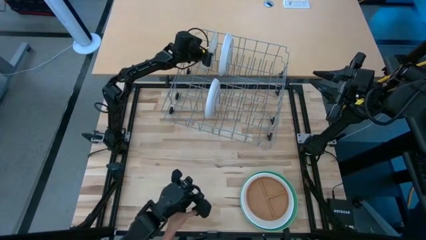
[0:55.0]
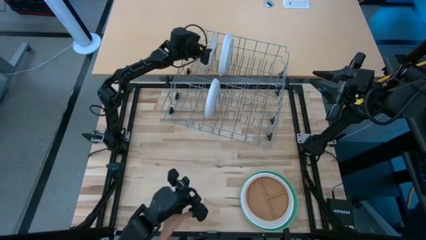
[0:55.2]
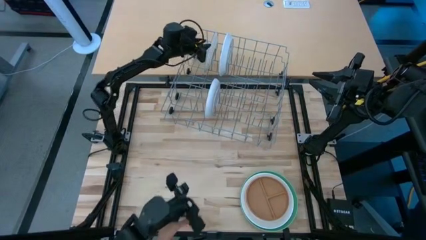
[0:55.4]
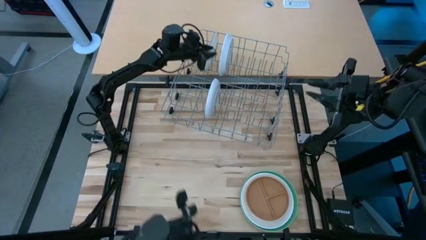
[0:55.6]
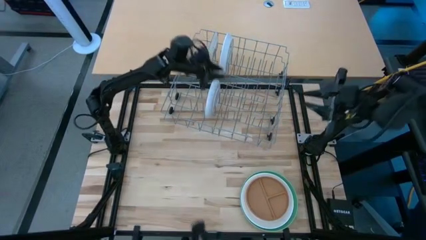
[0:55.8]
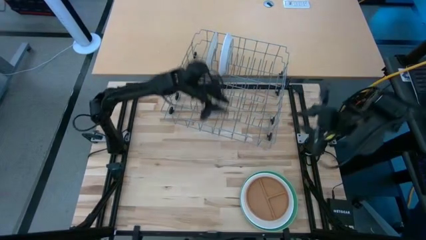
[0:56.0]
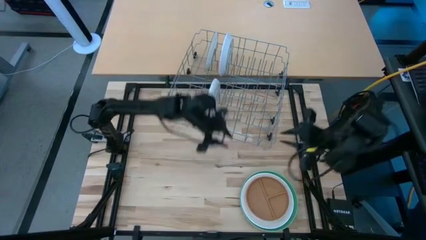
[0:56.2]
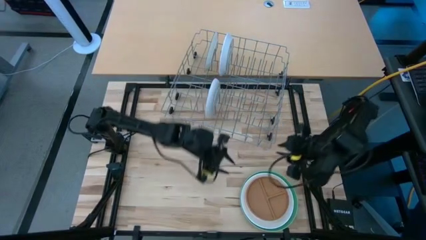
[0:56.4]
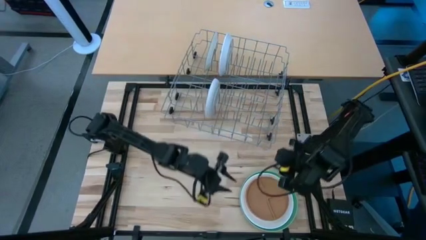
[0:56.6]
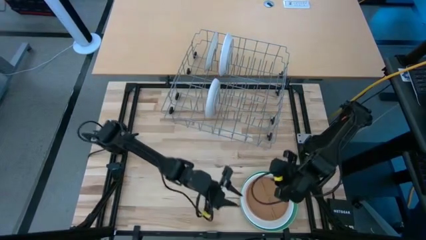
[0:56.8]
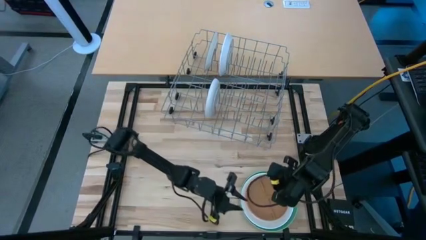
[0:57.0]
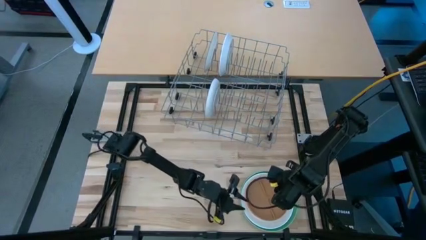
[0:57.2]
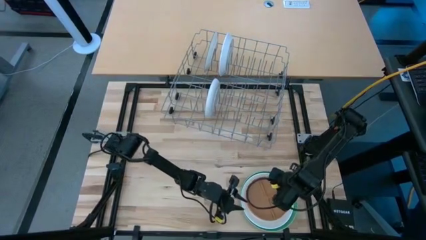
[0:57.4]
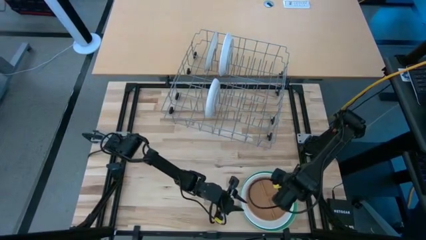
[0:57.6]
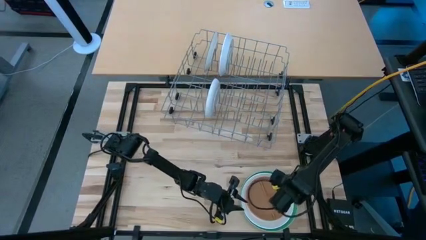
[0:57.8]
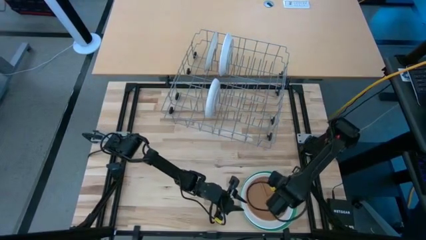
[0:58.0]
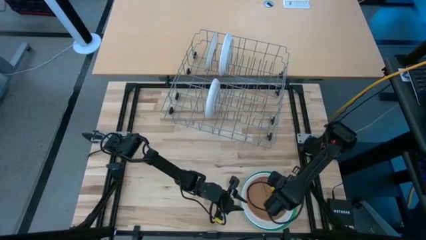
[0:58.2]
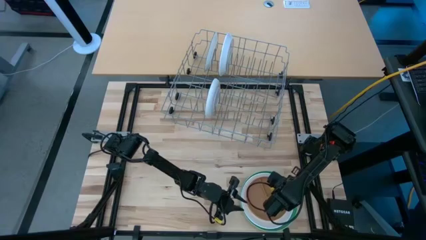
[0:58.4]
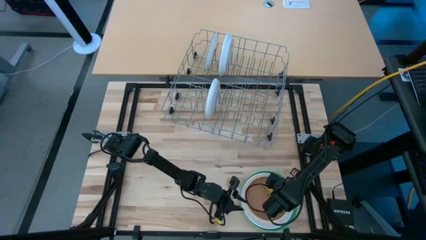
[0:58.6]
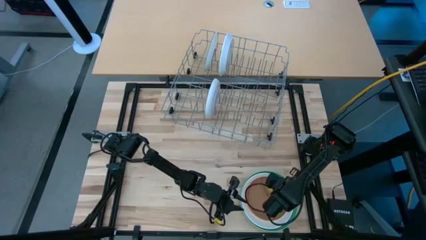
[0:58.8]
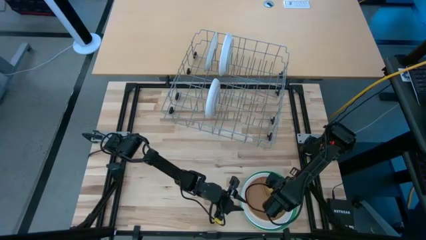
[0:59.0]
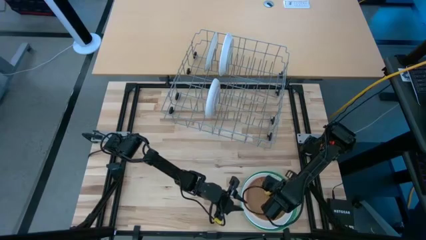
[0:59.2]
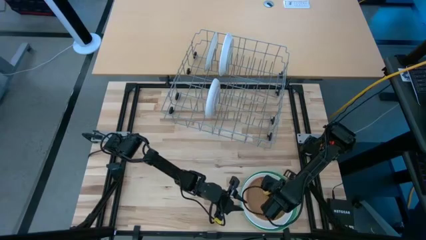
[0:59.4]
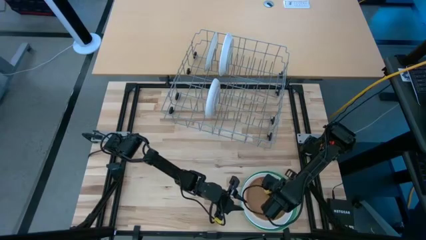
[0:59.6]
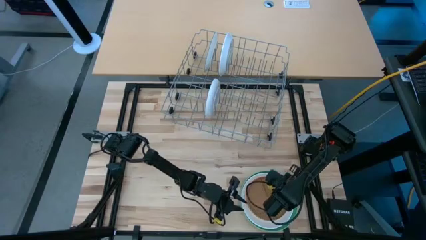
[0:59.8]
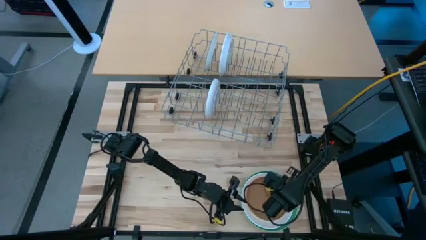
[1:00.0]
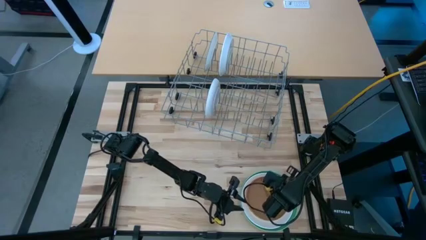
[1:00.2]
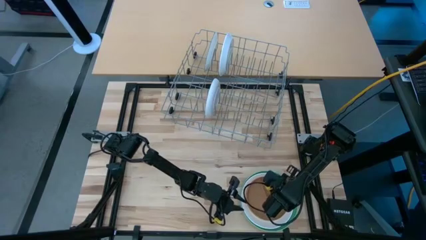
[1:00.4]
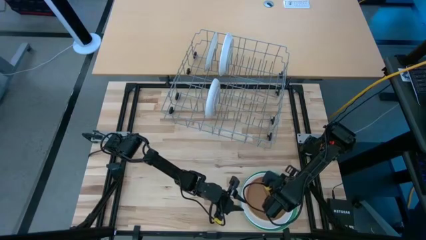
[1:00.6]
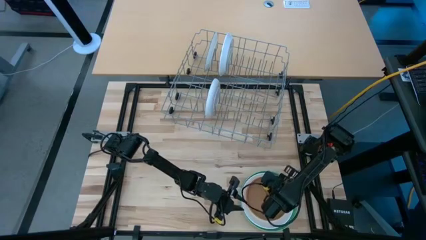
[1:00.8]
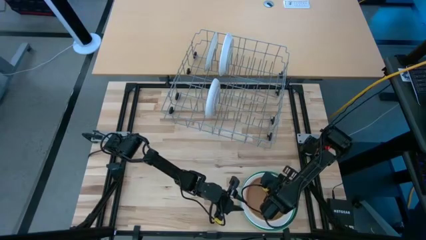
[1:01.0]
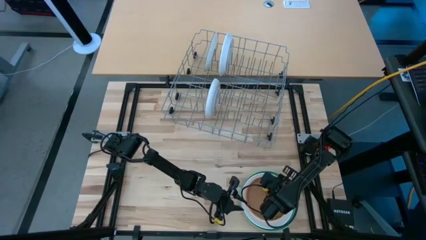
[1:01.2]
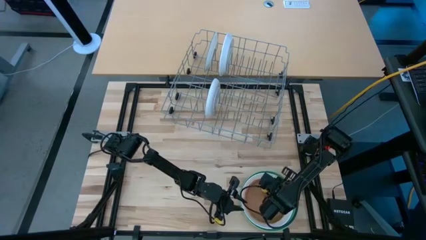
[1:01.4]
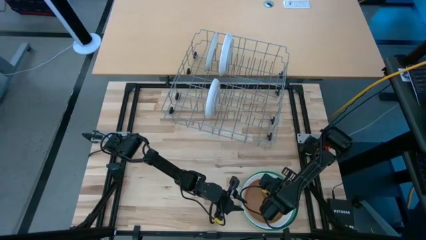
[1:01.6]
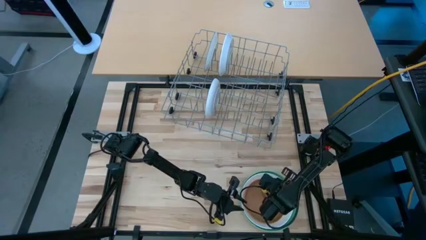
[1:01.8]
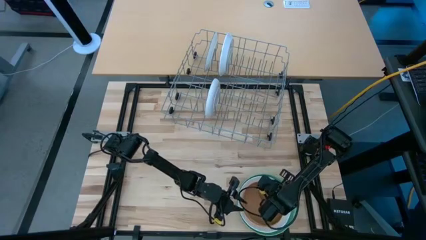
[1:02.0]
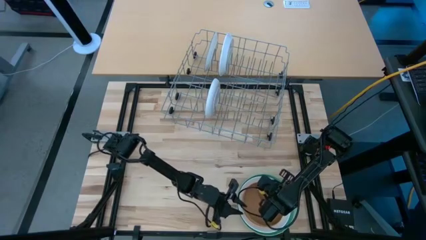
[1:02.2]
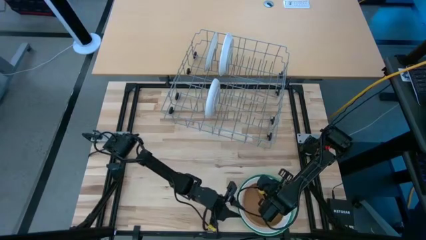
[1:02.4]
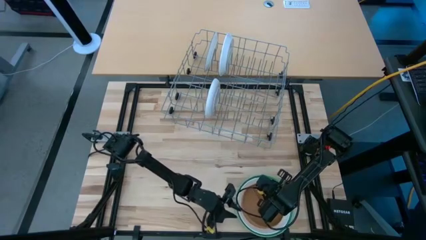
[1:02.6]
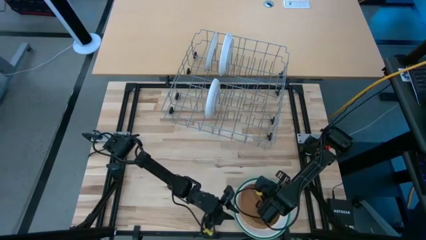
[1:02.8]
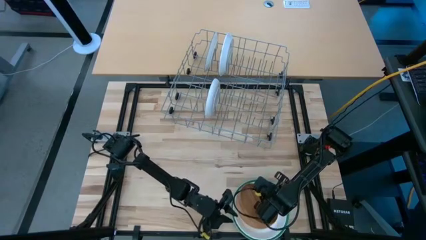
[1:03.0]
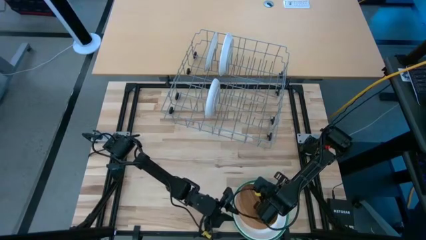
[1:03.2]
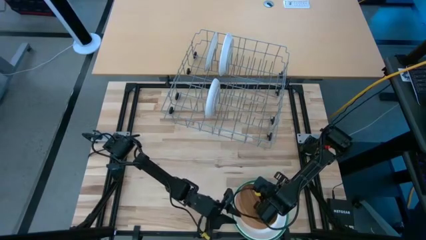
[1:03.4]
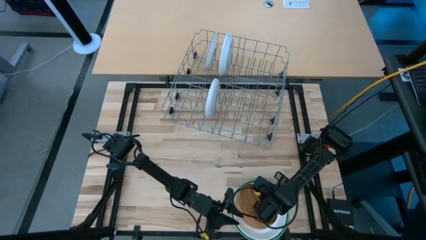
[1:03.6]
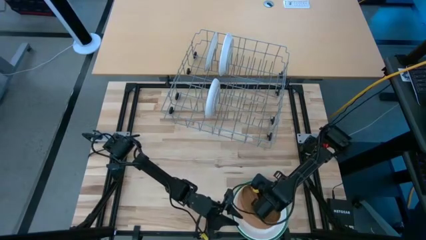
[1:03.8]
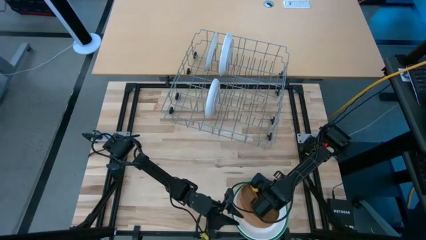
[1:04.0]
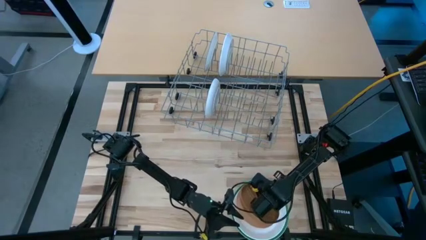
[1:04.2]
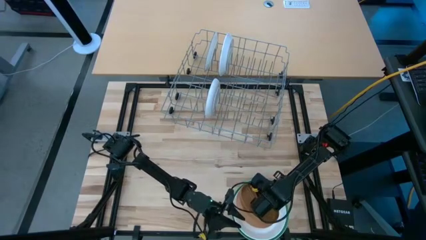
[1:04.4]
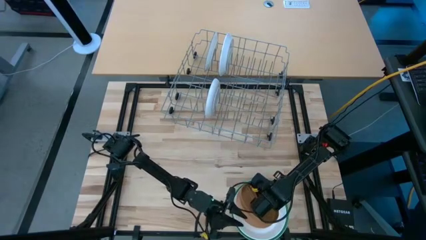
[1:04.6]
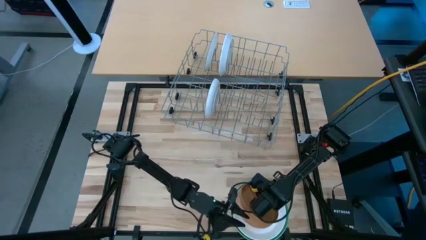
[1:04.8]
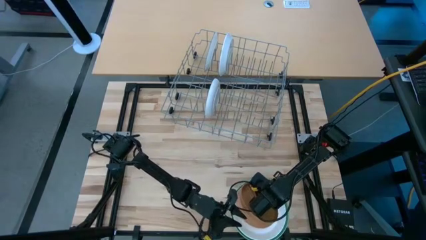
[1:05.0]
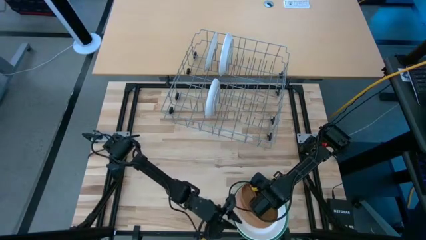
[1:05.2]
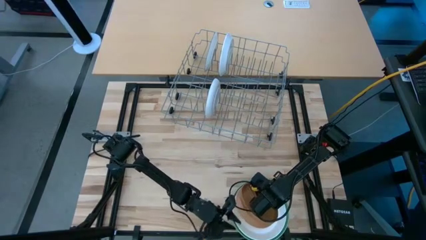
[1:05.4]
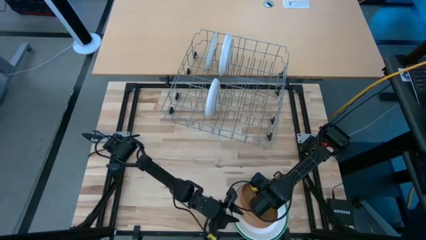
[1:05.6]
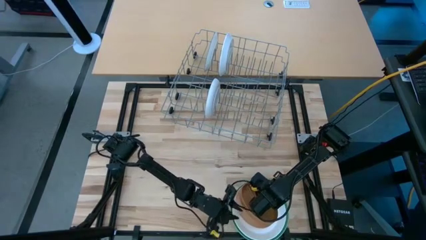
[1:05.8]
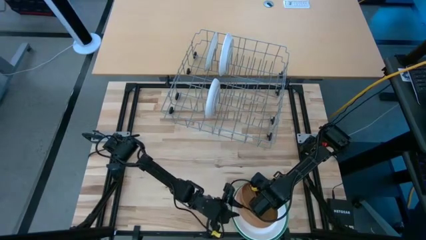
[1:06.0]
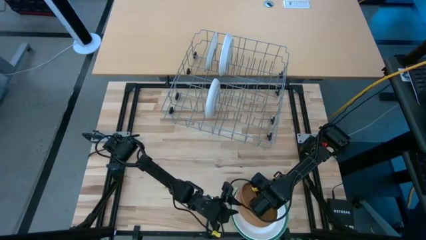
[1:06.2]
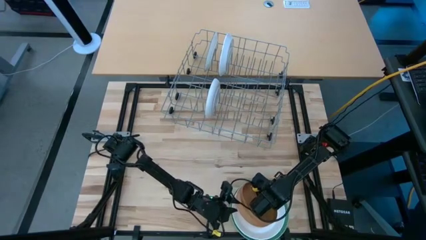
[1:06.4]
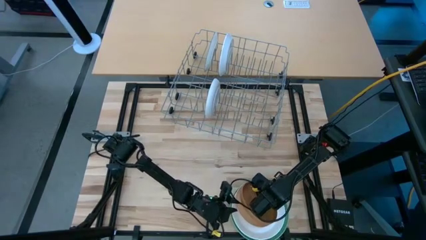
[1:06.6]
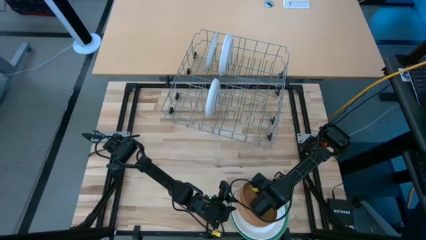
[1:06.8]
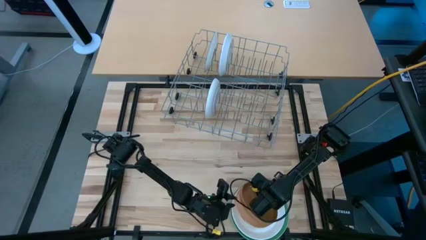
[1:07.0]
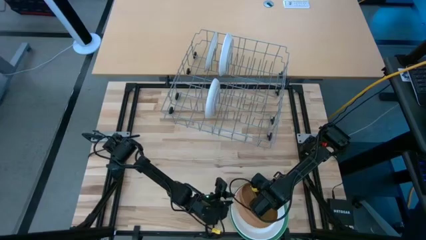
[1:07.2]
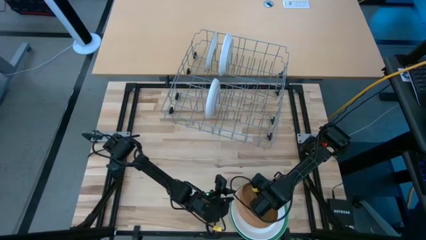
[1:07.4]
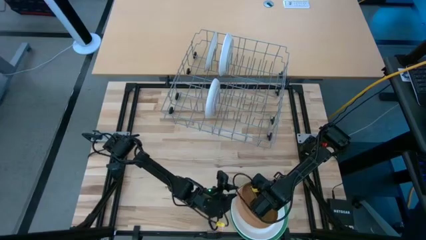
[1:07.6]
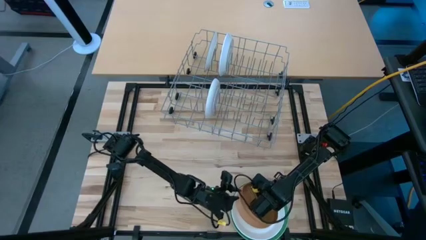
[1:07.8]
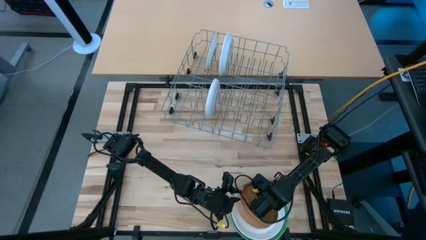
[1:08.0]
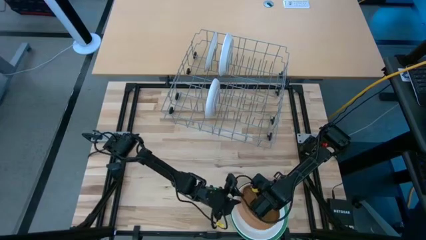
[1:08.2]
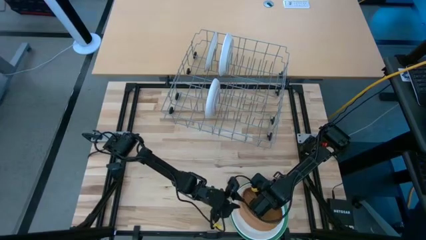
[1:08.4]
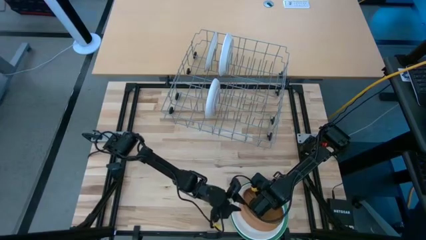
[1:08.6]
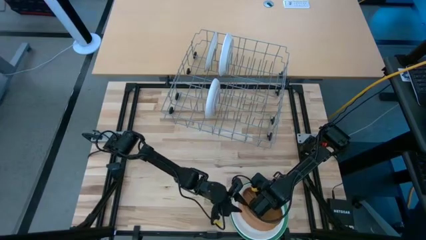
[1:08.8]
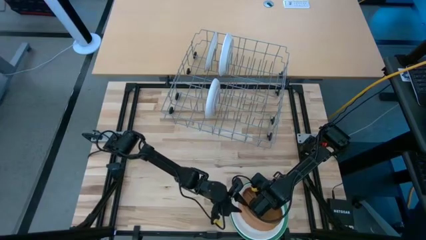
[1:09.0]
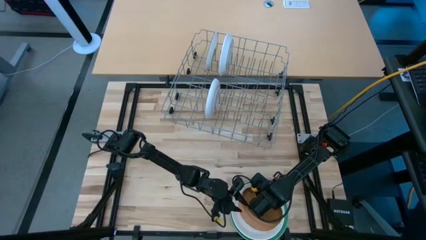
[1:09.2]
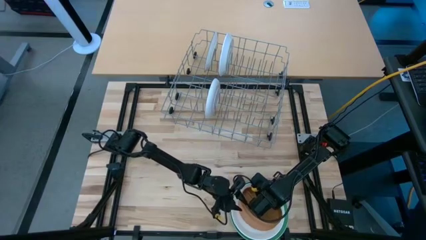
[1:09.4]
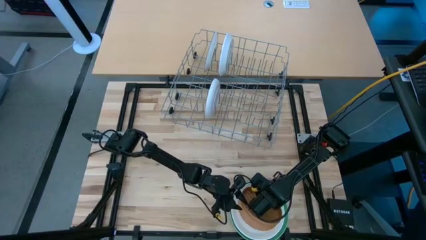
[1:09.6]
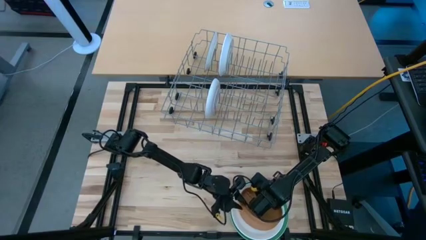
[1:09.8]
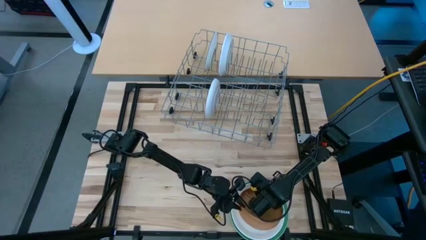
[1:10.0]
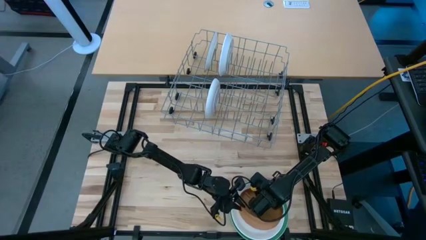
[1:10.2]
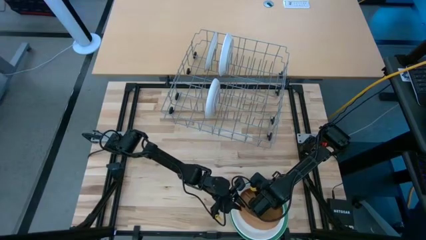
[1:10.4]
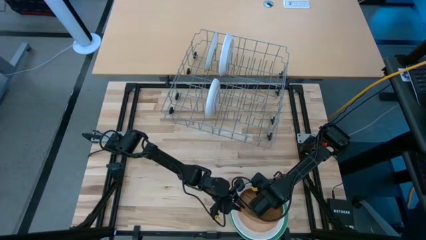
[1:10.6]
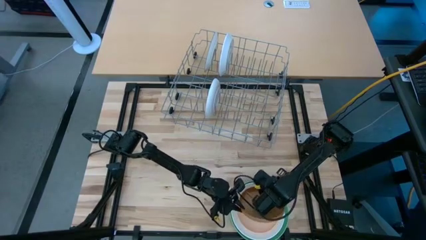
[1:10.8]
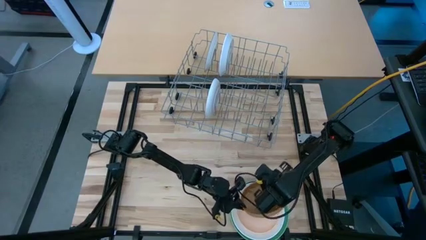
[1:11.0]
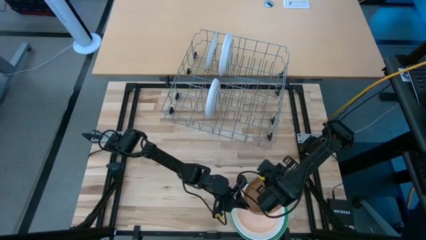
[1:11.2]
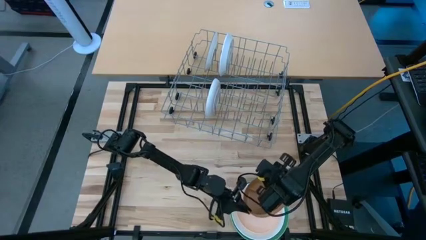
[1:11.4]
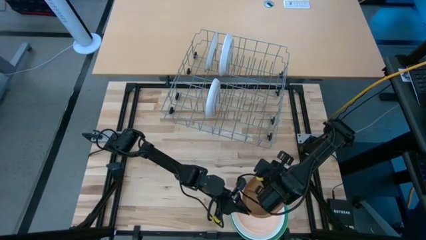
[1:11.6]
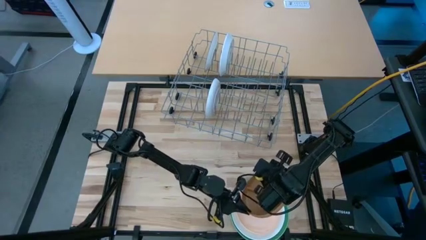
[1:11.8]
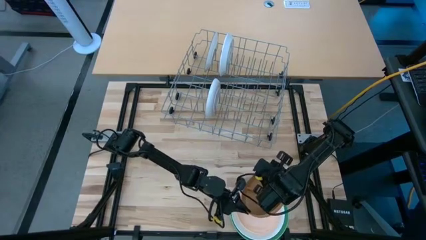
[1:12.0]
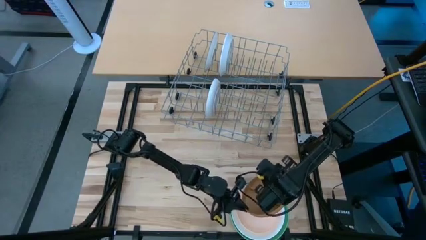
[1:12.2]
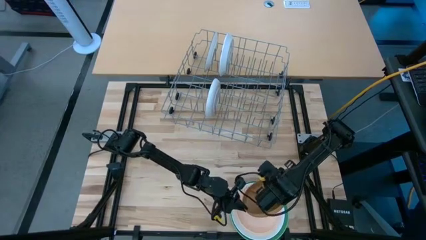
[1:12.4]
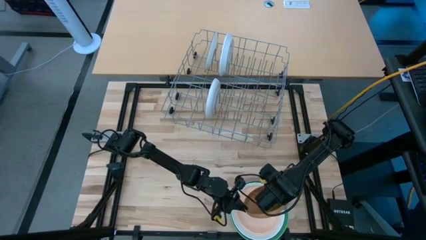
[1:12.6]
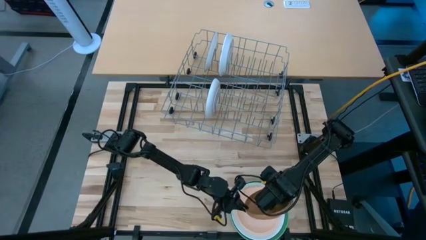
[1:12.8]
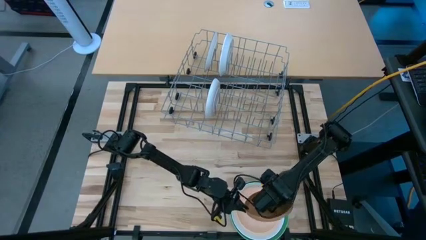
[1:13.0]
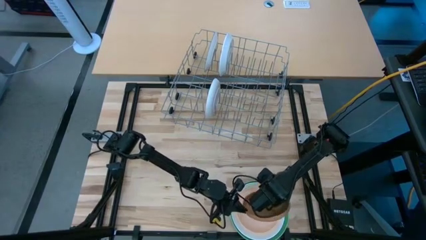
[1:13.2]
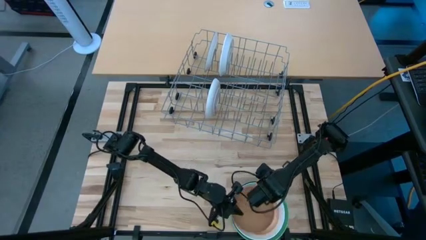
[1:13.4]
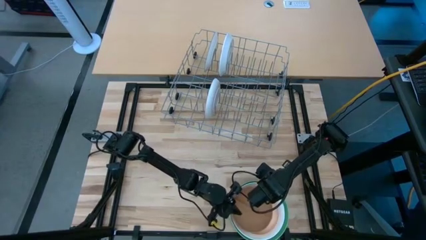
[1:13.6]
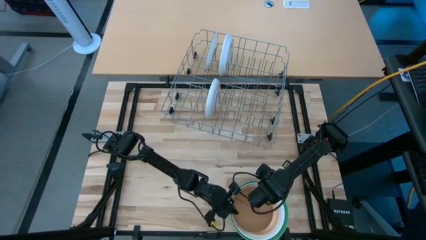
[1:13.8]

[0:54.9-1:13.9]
Task: Sort dishes
Put the brown plate into the gray dishwasher rack
